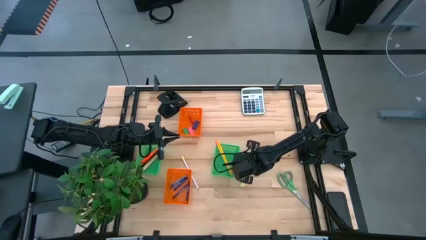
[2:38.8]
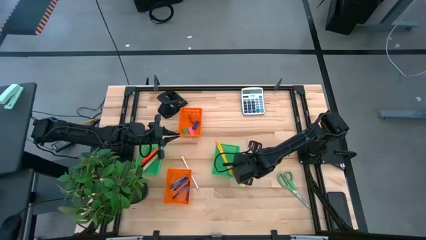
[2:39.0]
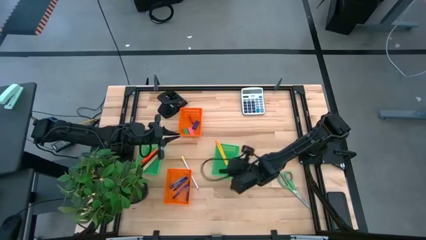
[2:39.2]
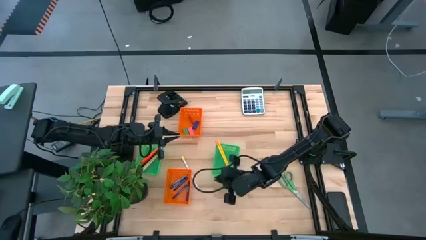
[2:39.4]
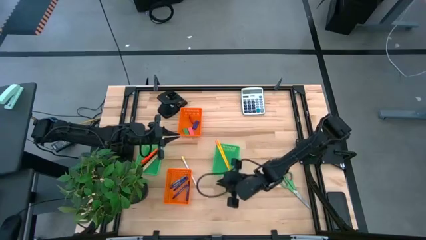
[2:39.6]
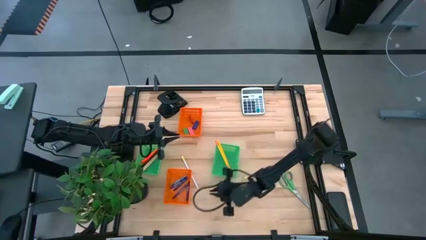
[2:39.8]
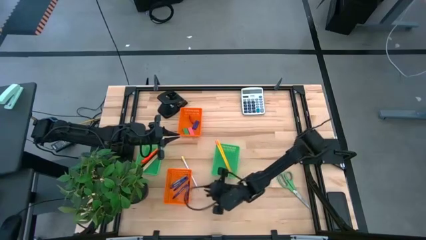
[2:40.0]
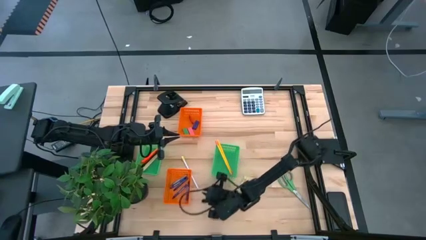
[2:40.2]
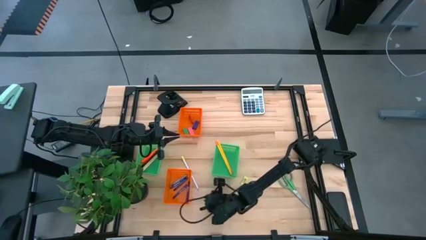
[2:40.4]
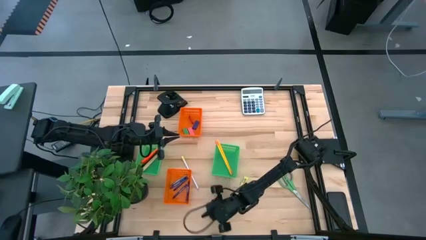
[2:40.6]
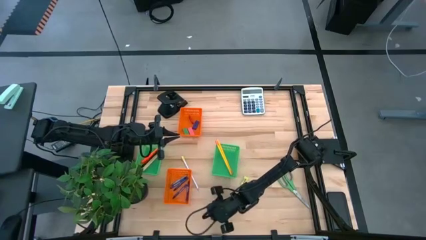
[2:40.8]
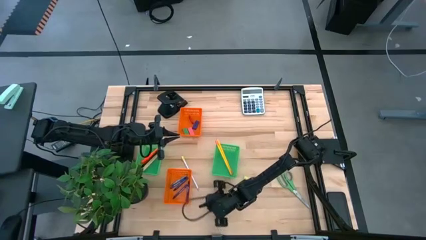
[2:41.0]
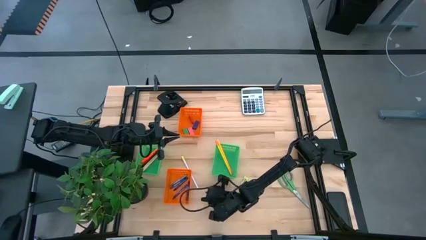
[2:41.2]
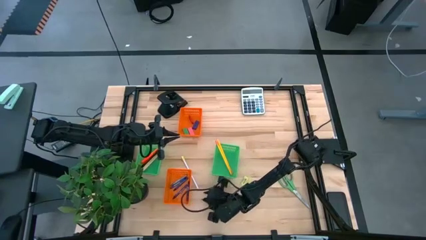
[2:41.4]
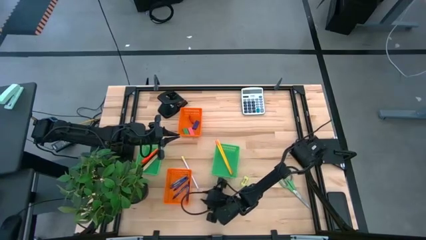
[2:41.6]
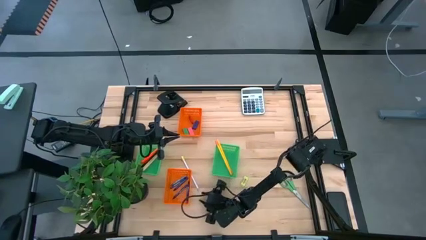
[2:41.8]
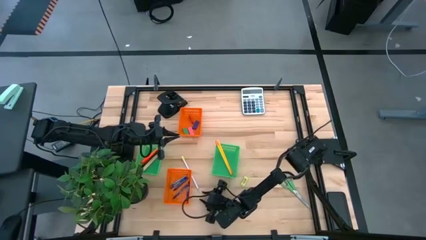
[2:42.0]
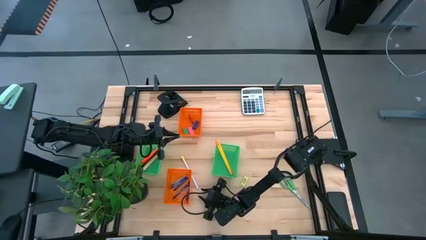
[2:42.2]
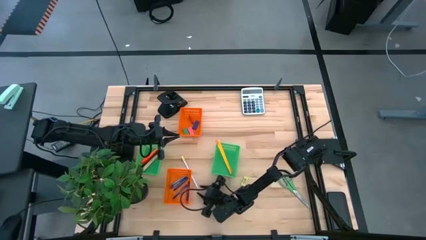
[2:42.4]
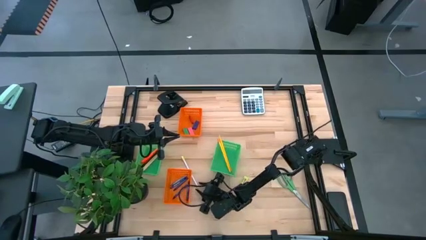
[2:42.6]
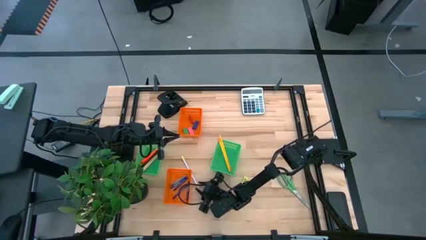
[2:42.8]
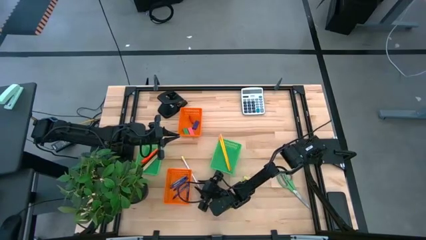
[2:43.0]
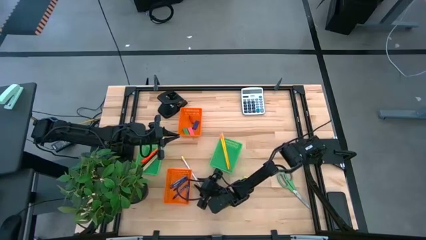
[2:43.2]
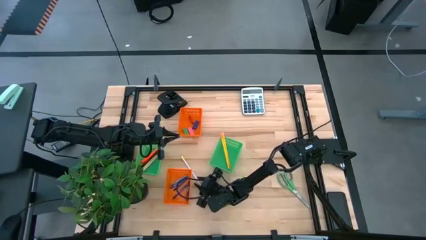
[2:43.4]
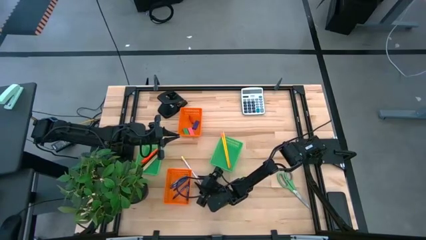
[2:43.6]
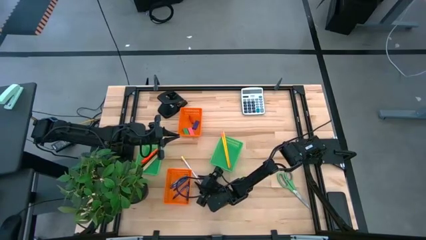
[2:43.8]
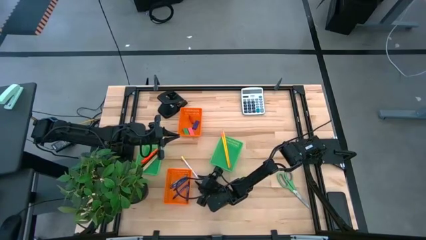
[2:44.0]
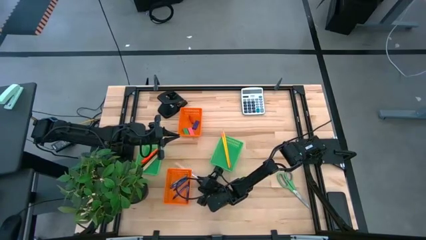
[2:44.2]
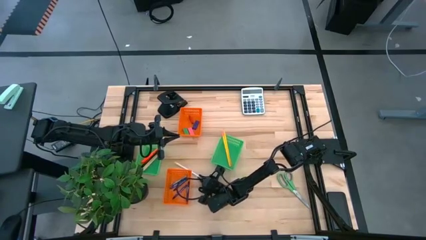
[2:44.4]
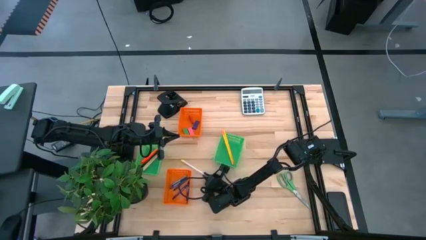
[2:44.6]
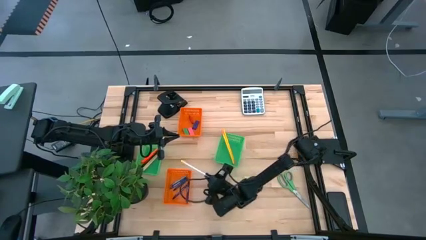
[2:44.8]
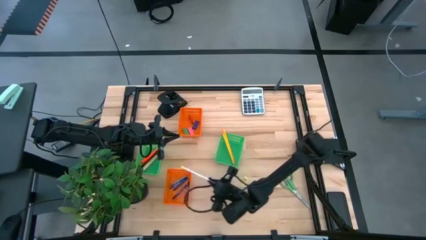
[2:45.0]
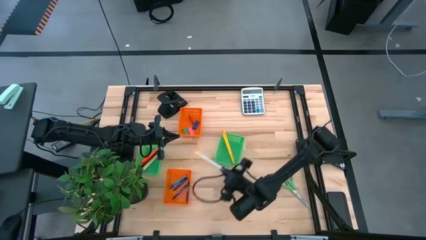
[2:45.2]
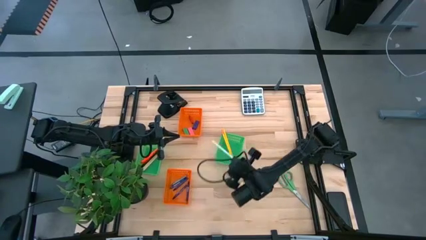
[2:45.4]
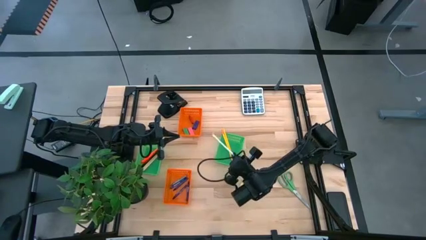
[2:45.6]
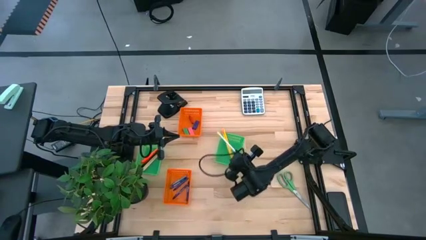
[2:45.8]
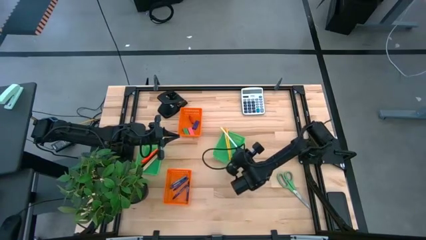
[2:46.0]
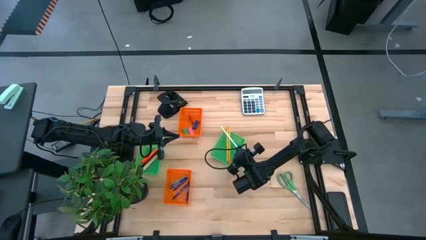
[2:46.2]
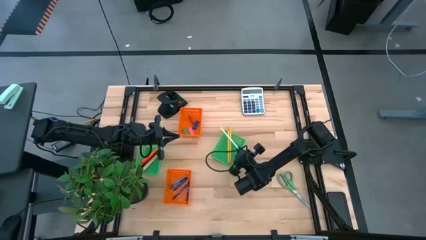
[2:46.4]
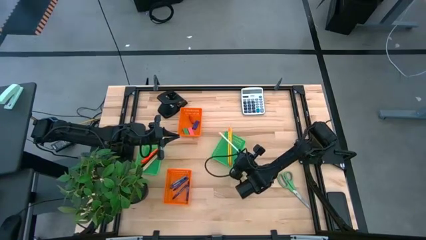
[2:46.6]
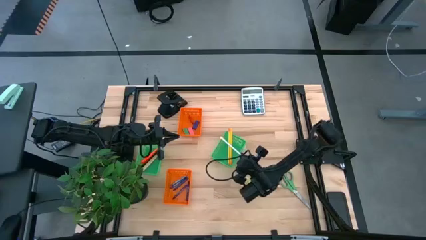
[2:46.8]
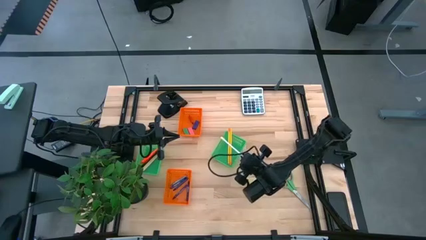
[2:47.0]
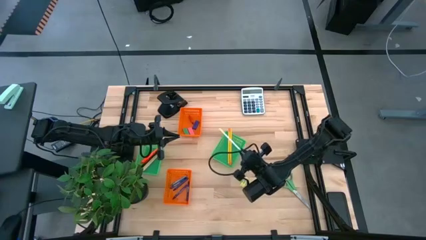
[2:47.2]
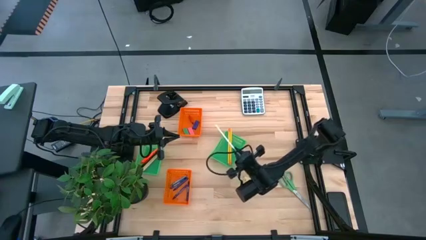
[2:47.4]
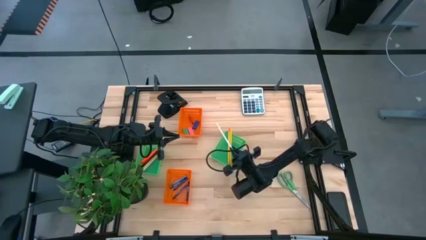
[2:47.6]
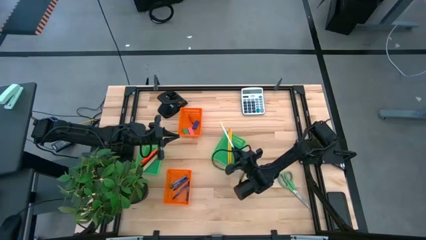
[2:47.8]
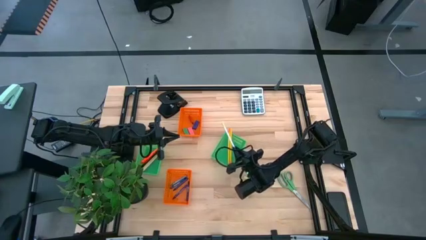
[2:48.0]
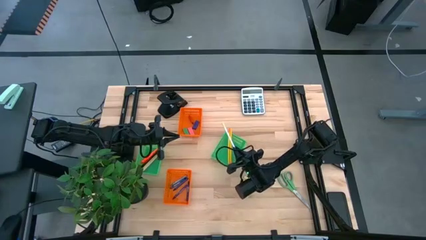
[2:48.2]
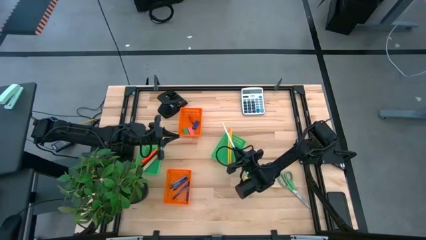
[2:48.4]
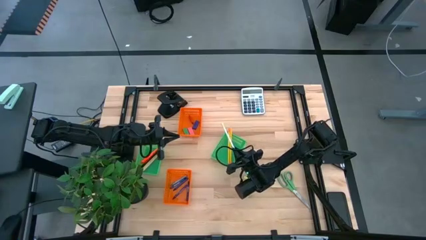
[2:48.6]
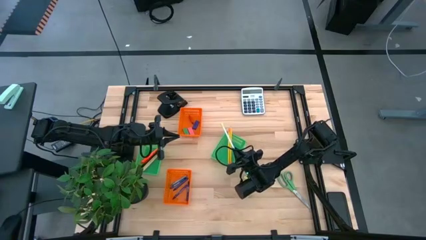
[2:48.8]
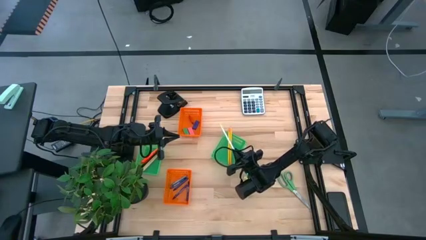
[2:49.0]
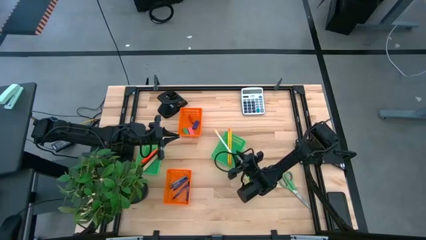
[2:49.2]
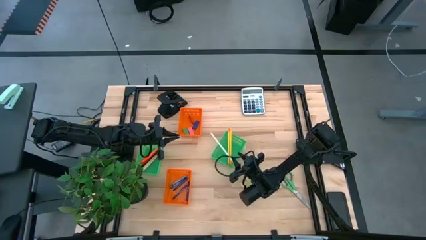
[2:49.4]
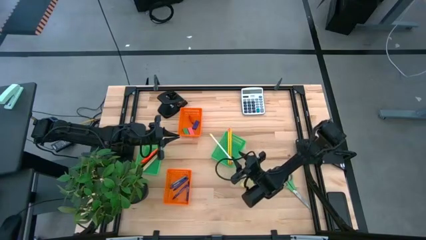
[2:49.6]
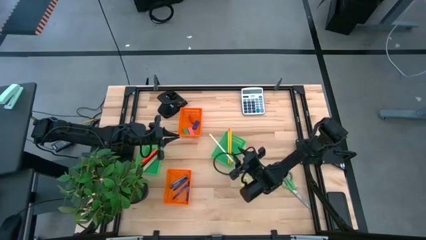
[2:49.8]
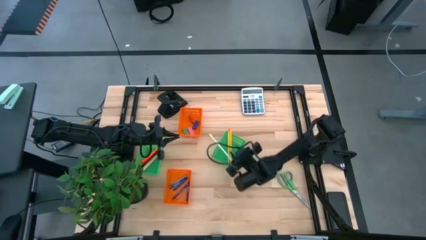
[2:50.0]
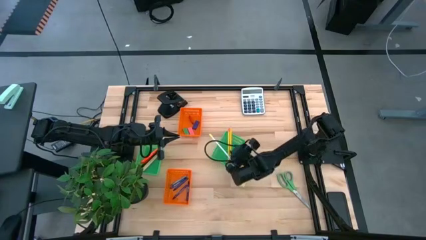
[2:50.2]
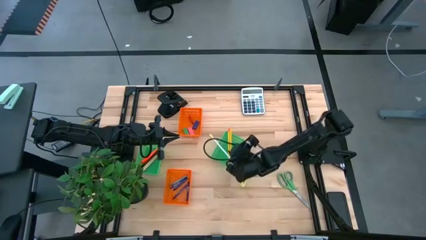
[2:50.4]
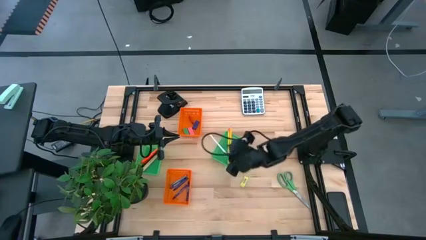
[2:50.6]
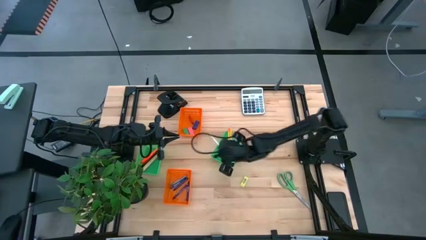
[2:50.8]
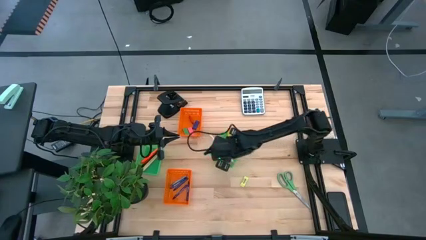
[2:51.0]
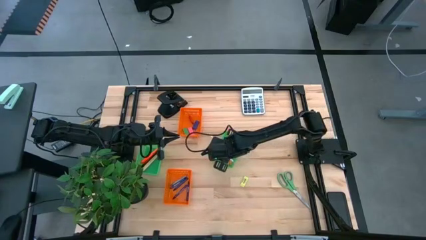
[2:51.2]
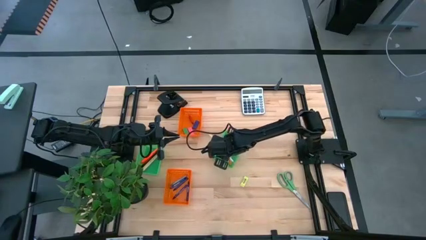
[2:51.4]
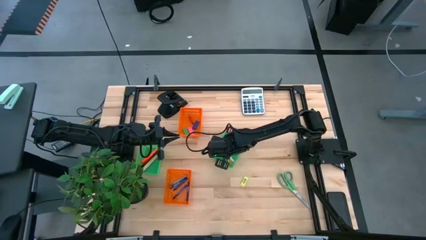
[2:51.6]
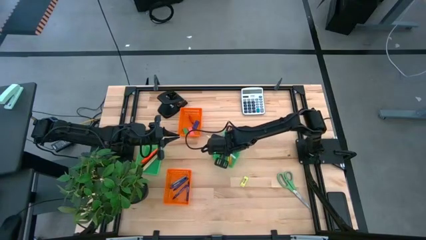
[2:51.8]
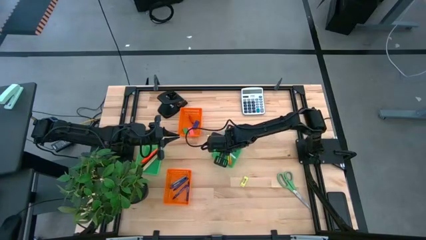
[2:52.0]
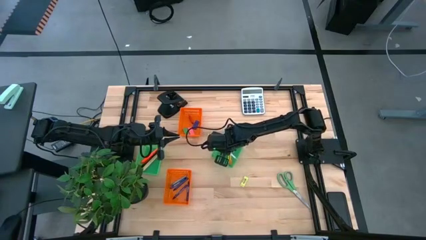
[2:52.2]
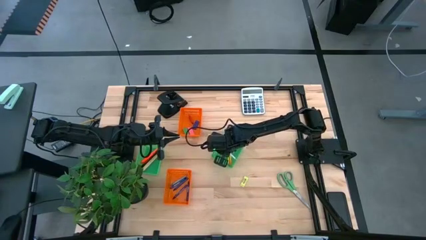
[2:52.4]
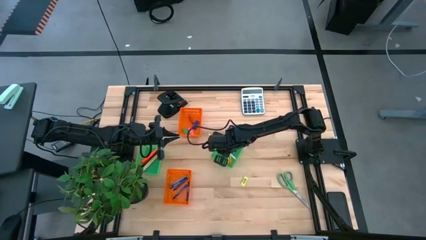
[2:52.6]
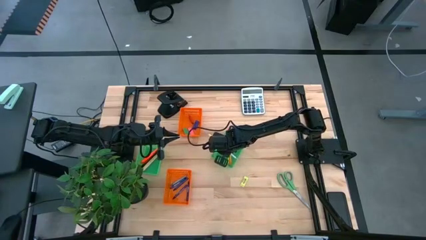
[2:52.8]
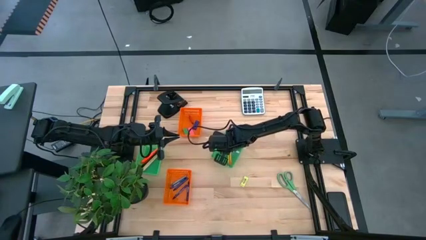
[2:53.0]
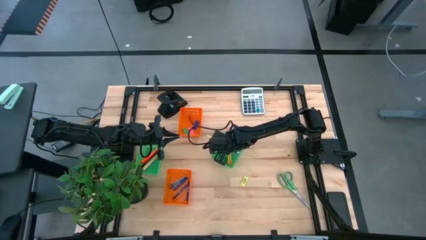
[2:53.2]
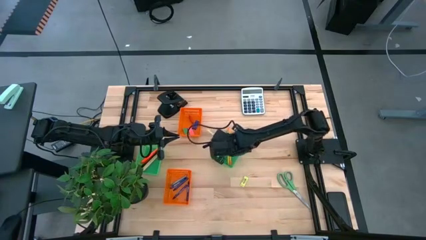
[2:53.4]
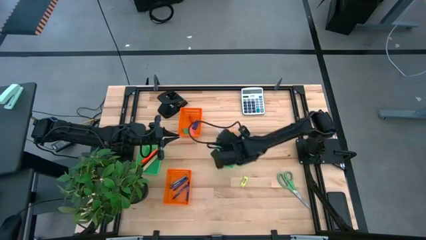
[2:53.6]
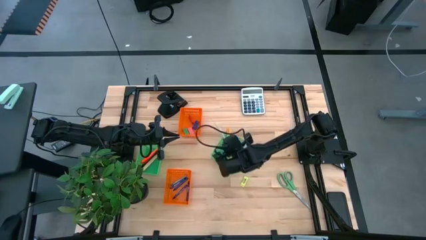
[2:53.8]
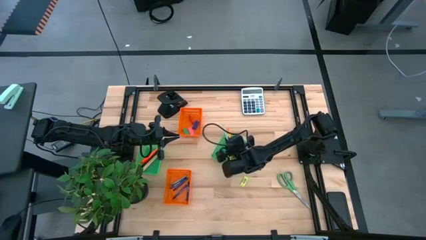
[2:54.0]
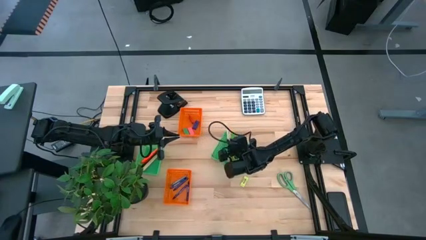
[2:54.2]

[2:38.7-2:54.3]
Task: Sort crayons/erasers/pens/pencils in bins
Put the white pencil into the right green basket

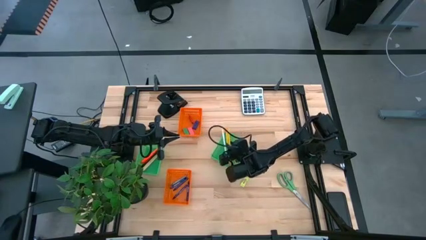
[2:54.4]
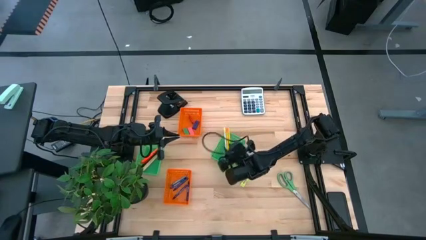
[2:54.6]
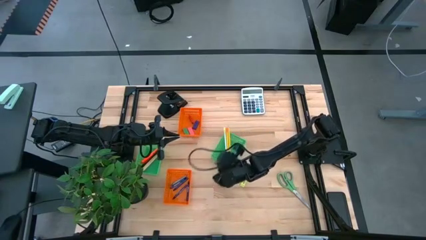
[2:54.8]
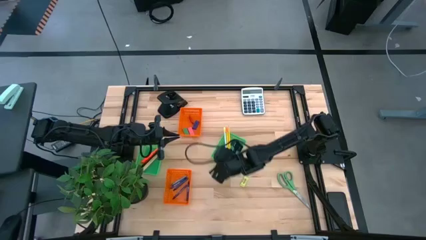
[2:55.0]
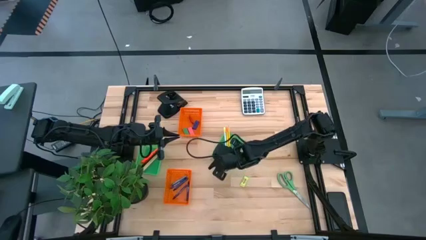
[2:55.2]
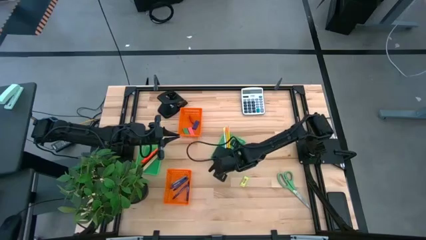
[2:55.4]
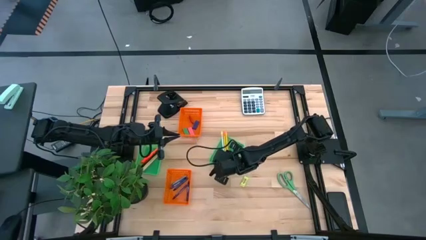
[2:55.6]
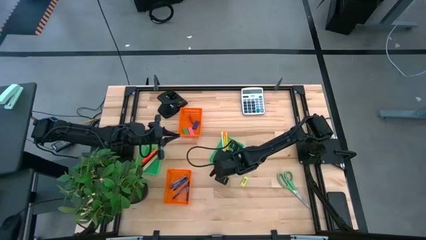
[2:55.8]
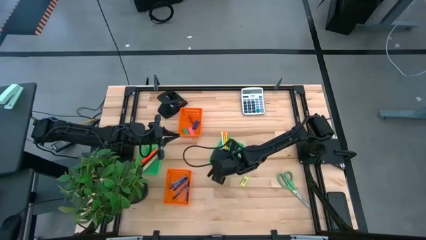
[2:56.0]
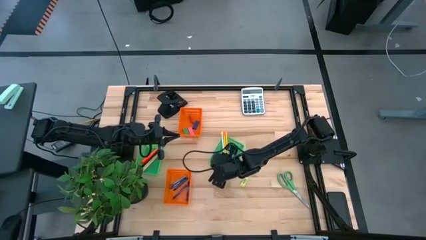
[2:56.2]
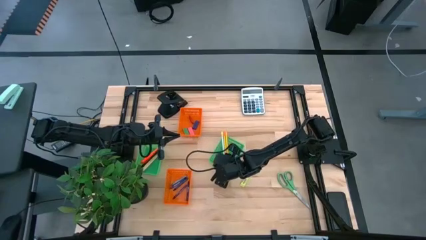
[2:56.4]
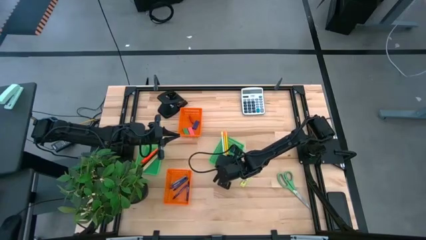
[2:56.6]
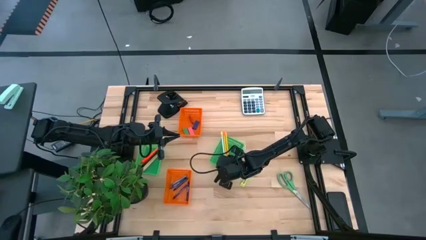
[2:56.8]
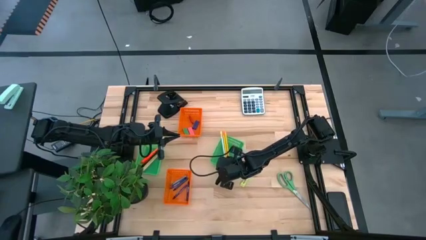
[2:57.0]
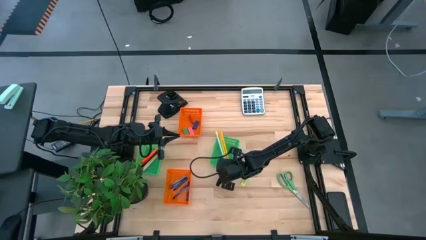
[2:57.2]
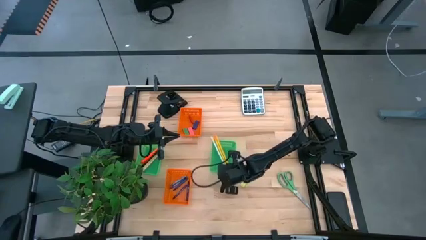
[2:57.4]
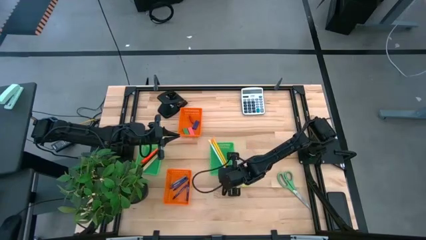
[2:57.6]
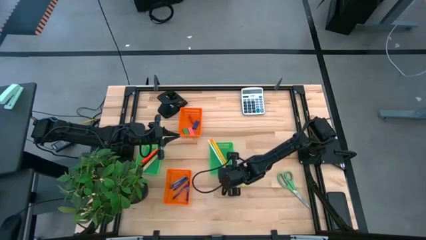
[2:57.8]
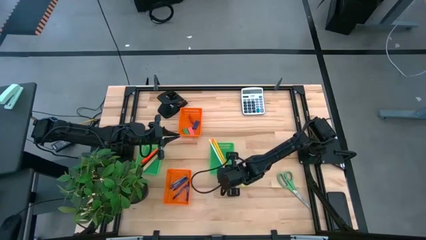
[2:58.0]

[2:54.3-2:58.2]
Adjust the right green basket
